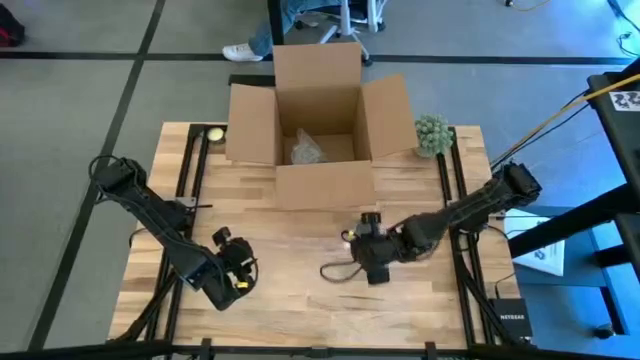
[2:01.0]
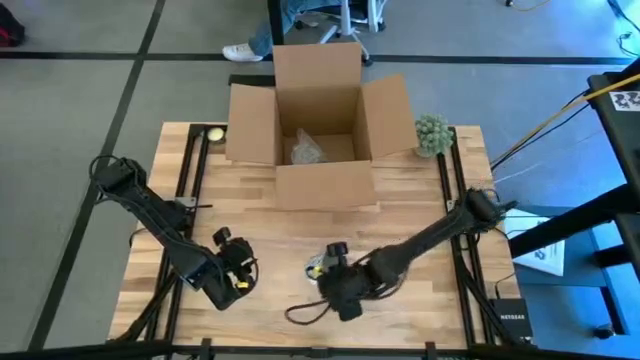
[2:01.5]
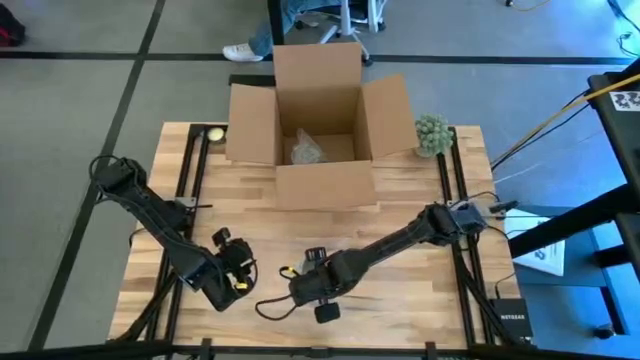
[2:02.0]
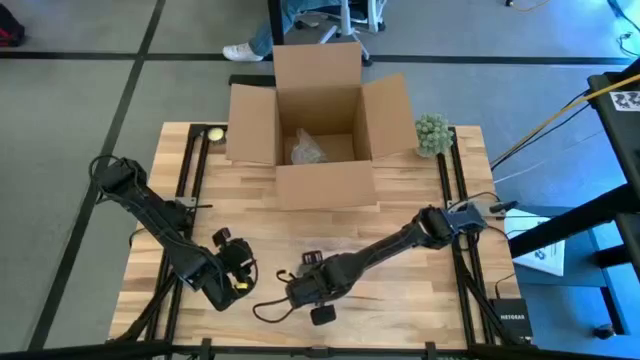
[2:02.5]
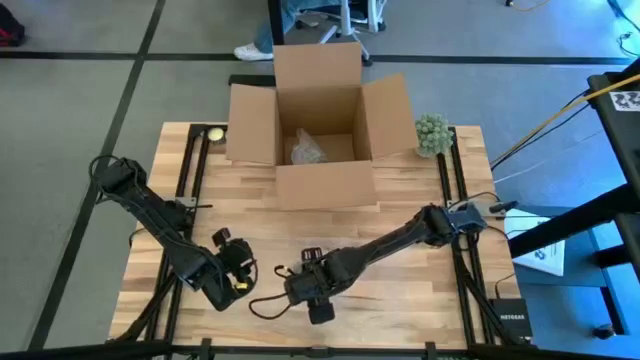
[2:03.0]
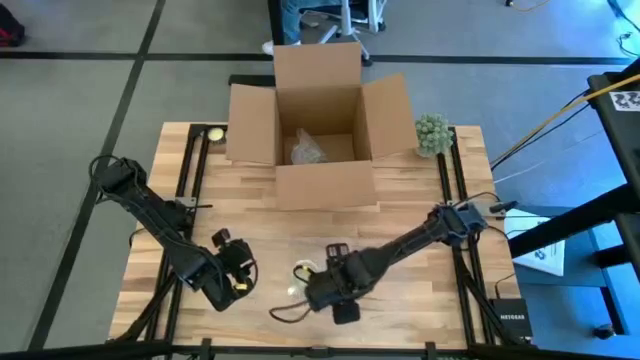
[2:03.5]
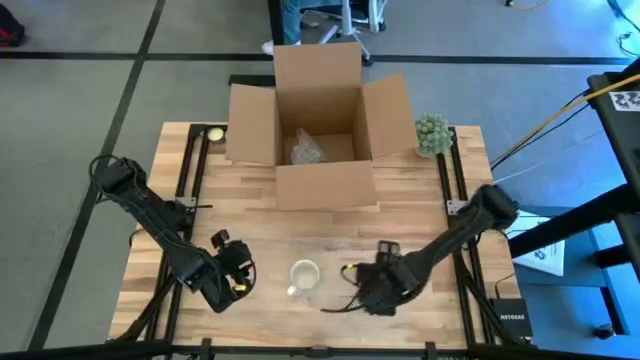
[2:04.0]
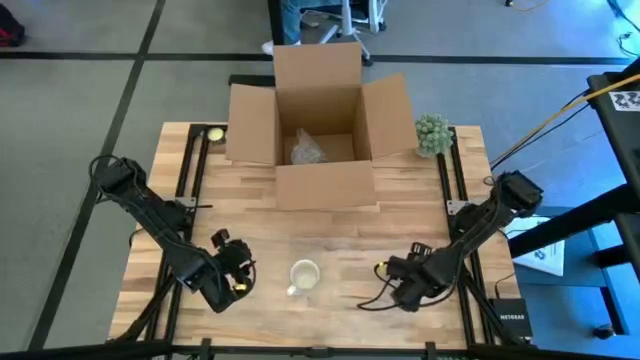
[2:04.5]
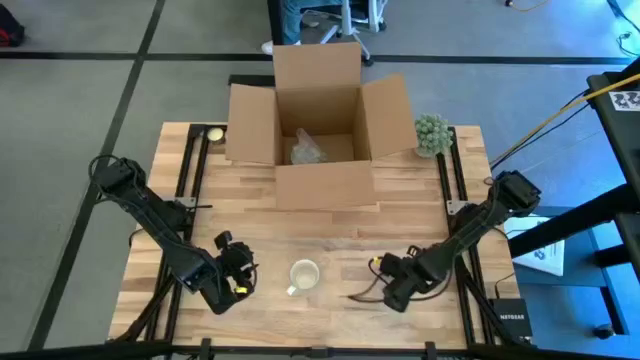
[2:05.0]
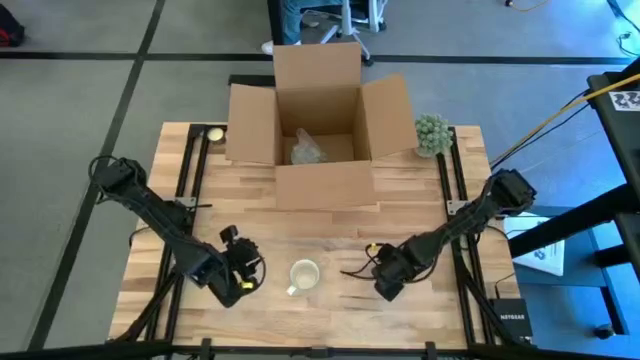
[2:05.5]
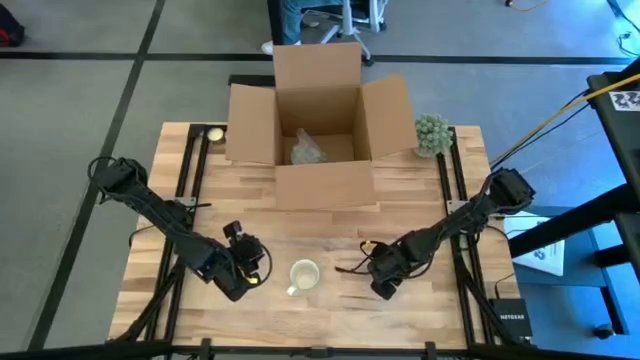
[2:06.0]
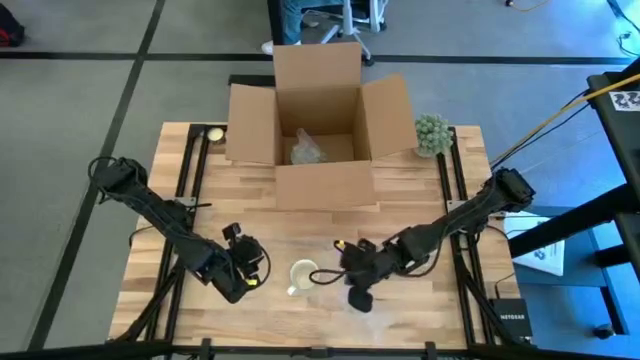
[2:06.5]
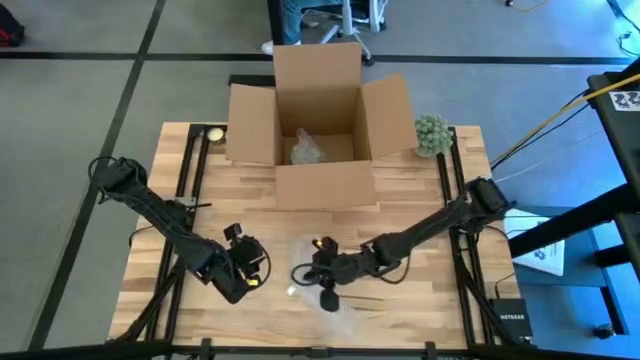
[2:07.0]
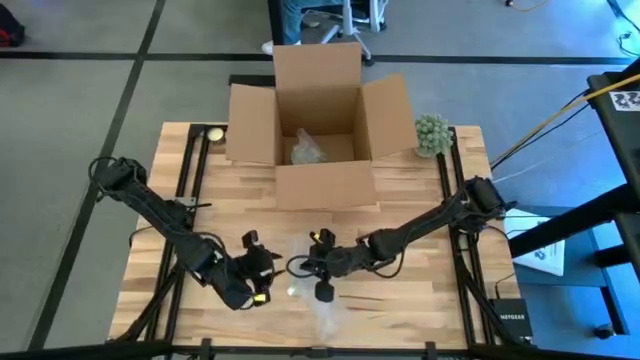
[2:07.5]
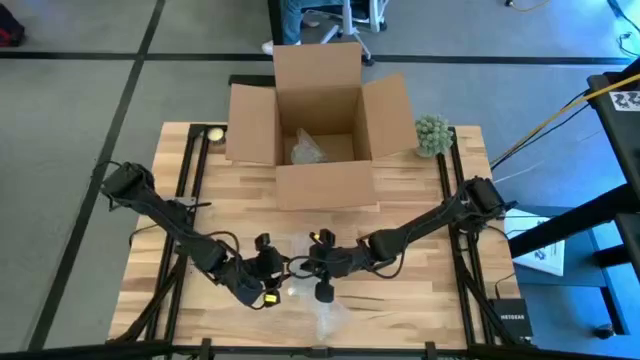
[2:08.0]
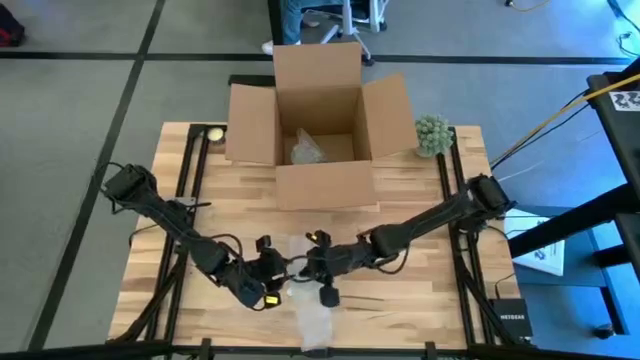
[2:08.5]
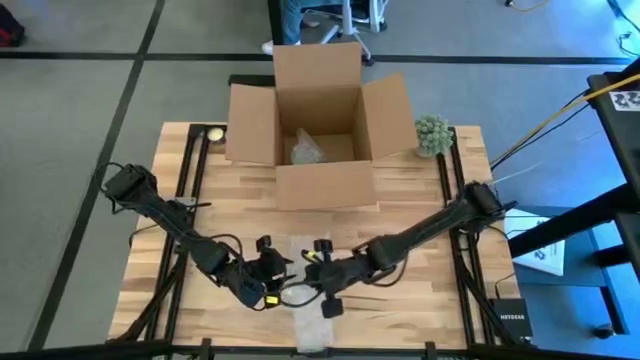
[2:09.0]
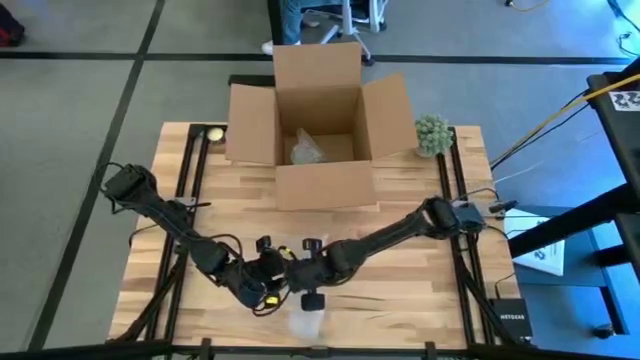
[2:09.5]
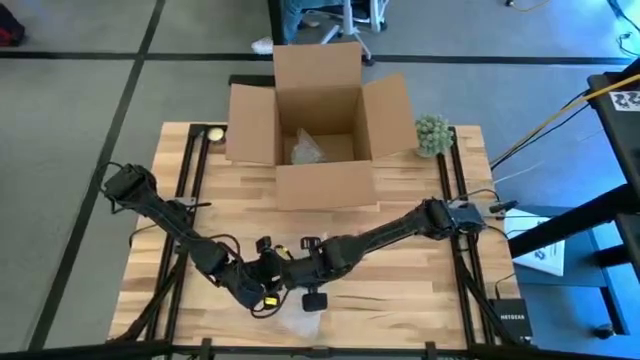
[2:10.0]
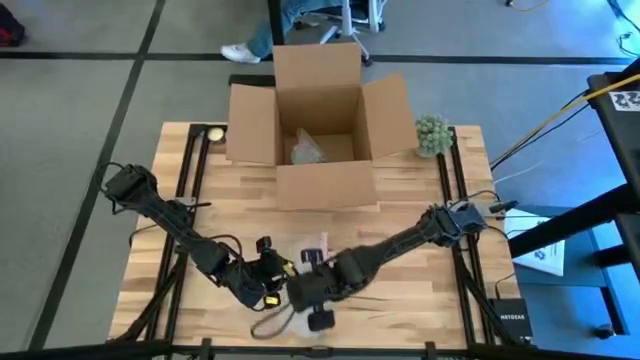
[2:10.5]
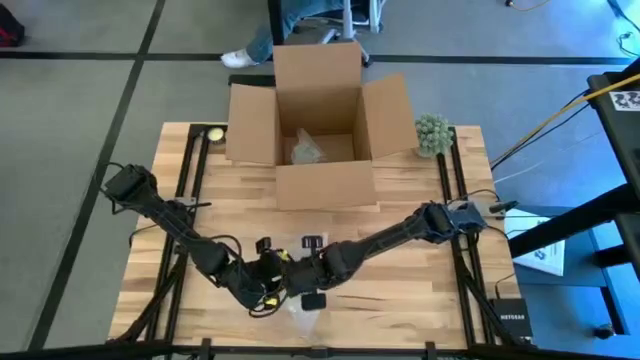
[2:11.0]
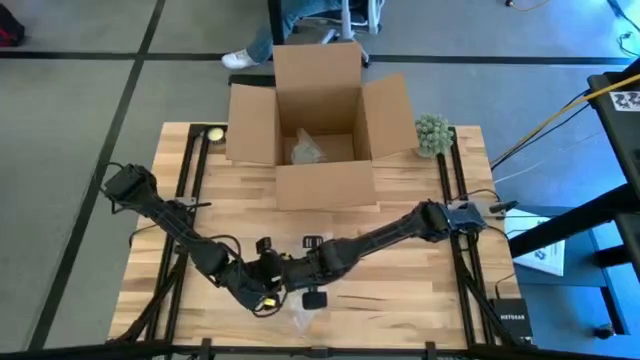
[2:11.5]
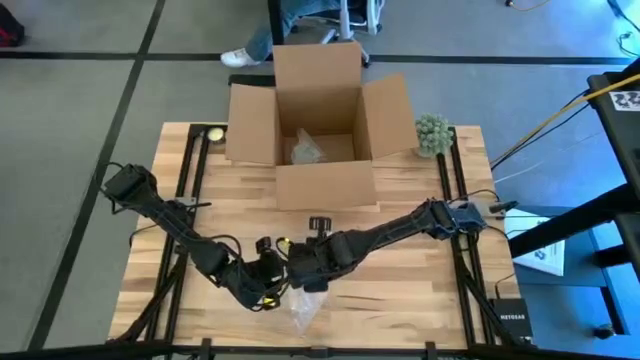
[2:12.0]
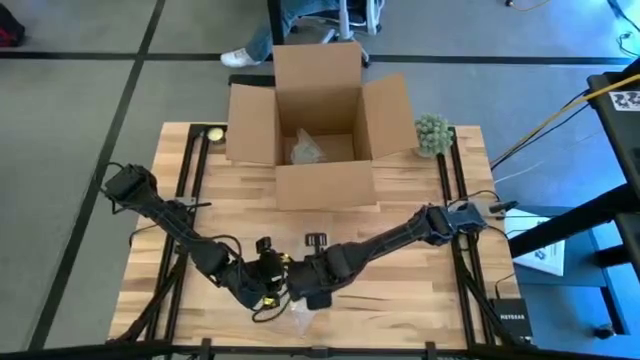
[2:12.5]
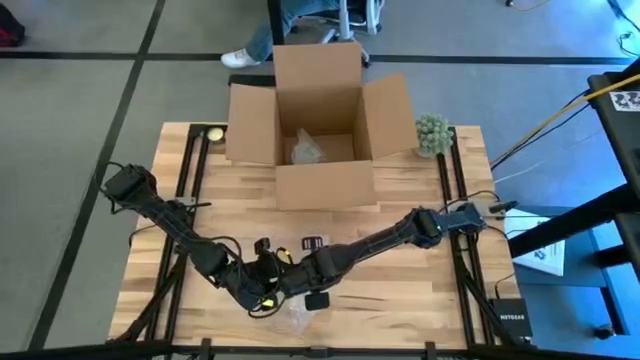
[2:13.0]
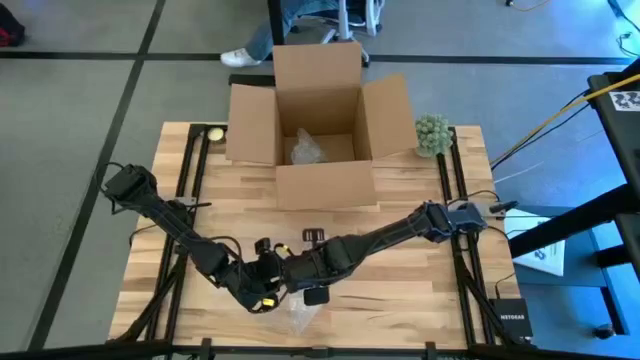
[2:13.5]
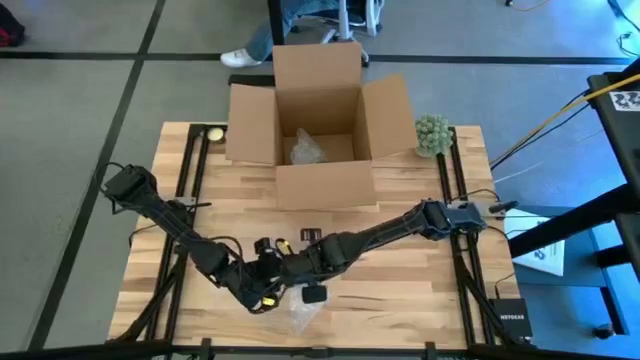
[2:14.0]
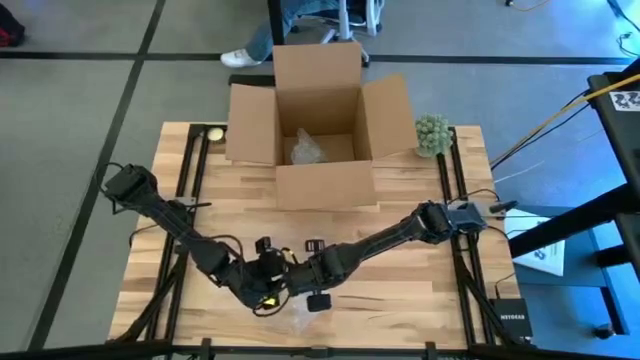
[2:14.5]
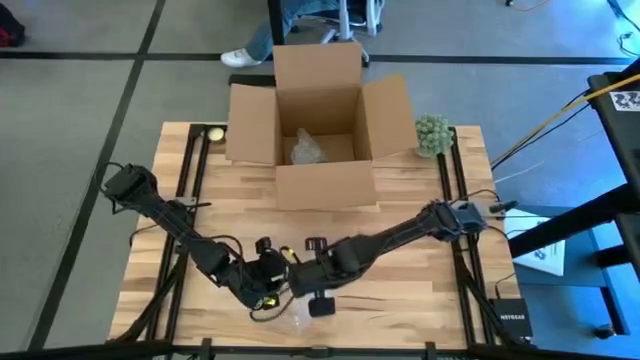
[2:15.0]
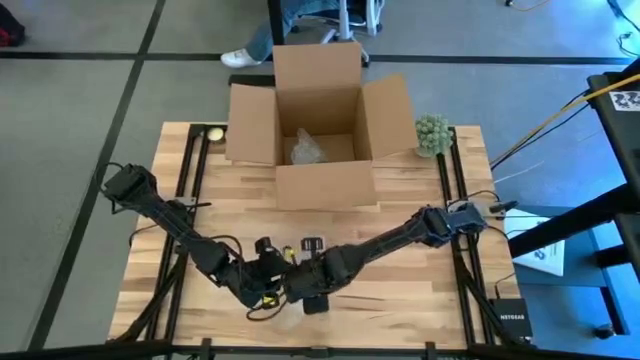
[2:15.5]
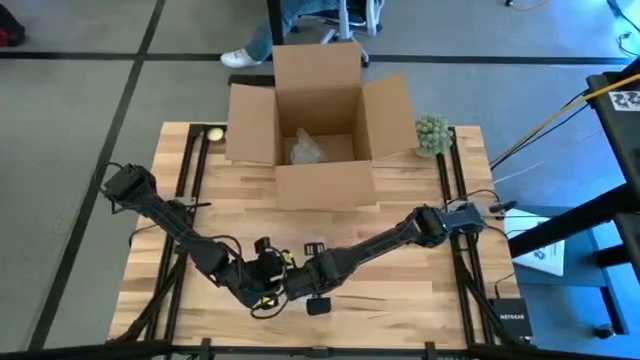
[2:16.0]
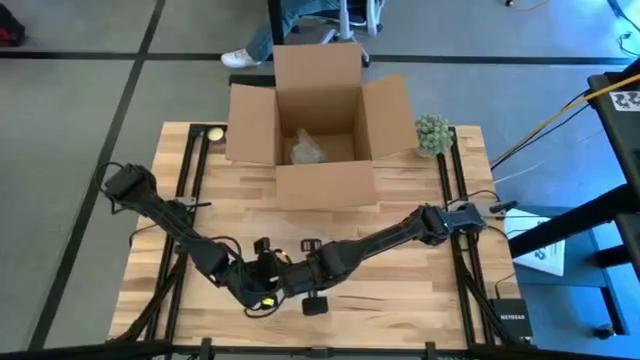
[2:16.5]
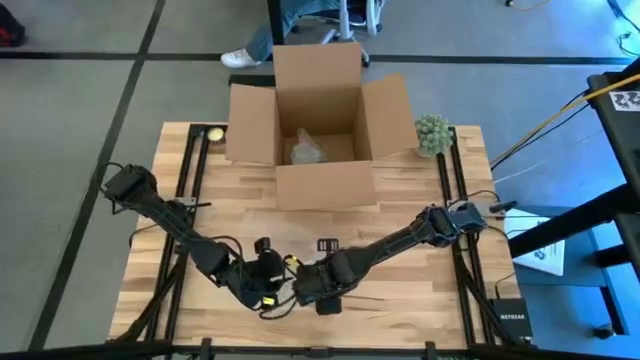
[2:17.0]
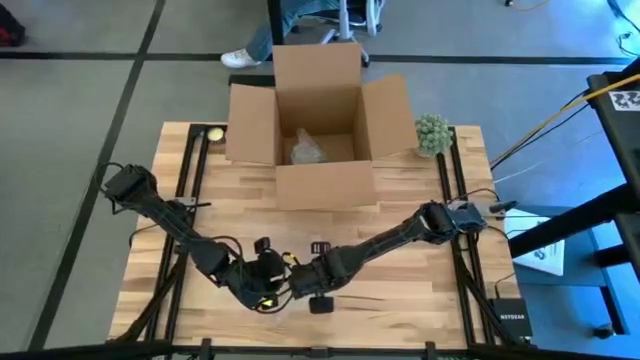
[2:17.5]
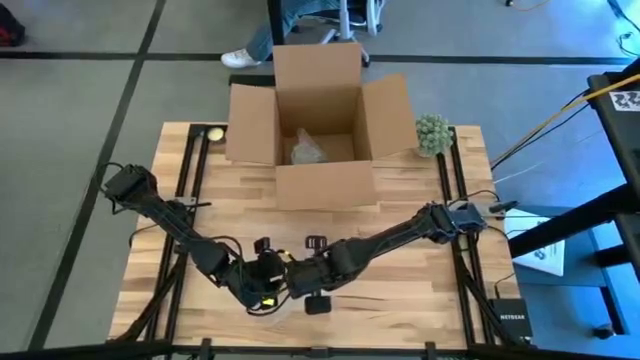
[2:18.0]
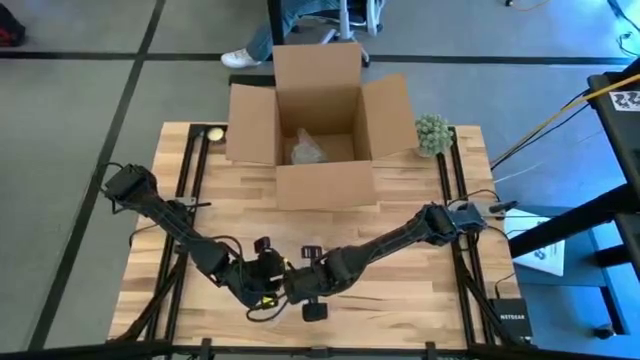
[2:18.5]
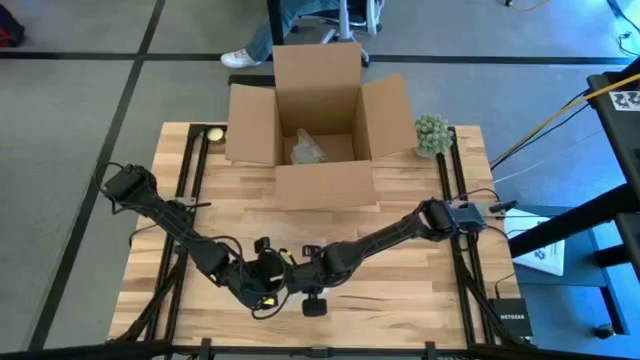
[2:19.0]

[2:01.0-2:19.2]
Task: wrap mug
Wrap the white mug with bubble wrap

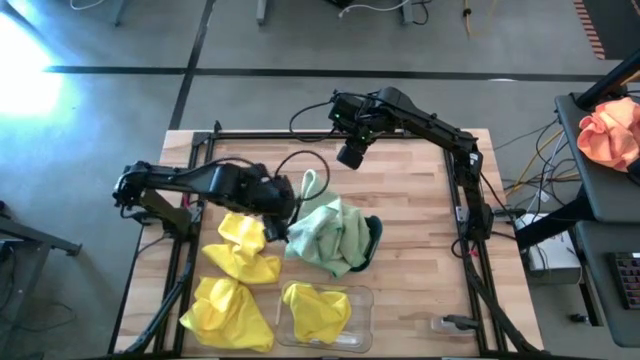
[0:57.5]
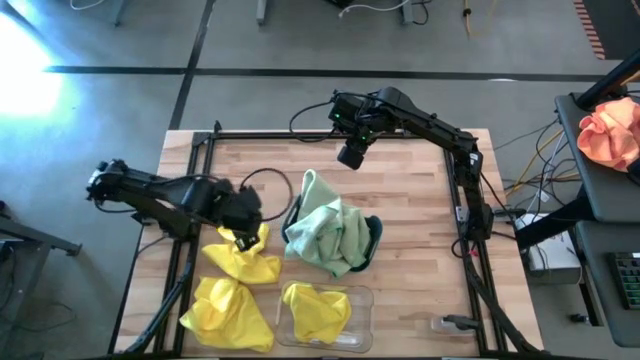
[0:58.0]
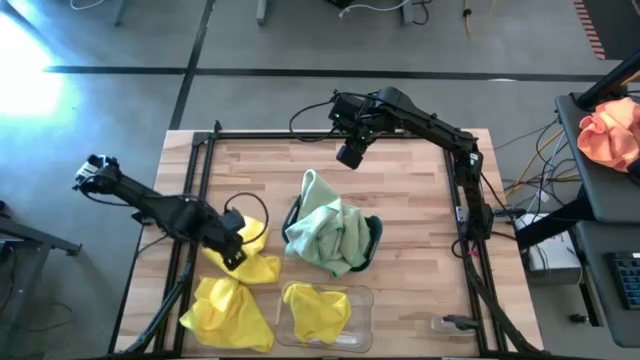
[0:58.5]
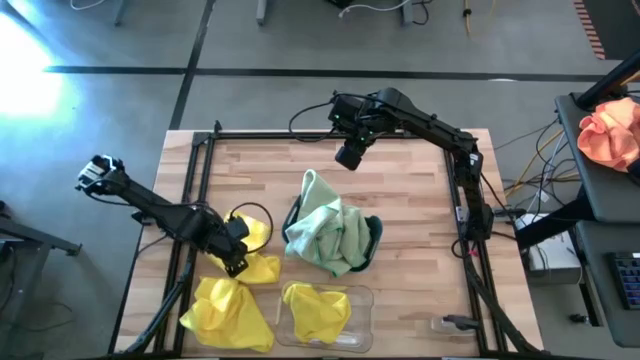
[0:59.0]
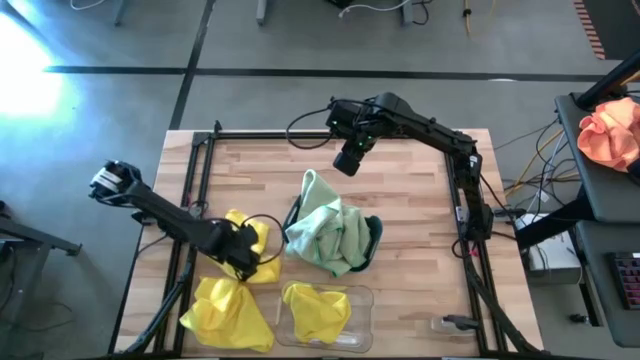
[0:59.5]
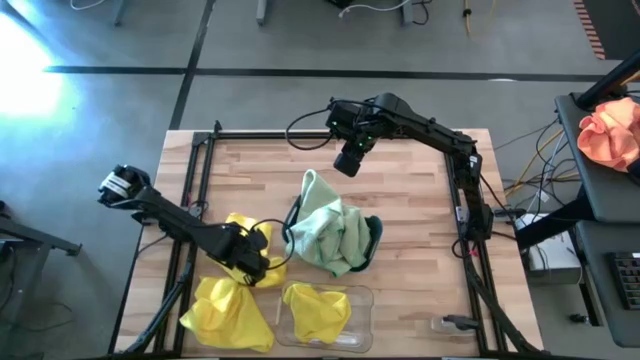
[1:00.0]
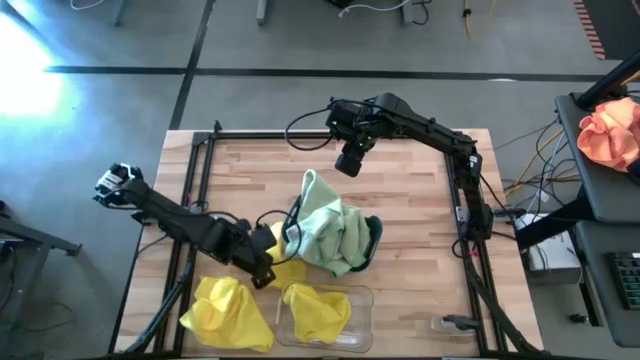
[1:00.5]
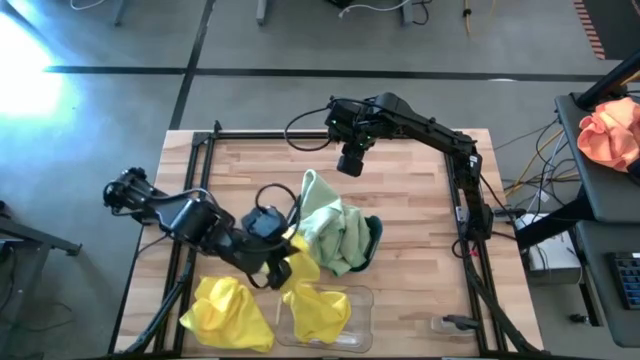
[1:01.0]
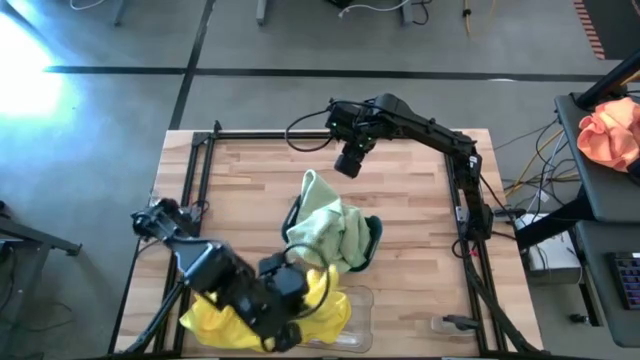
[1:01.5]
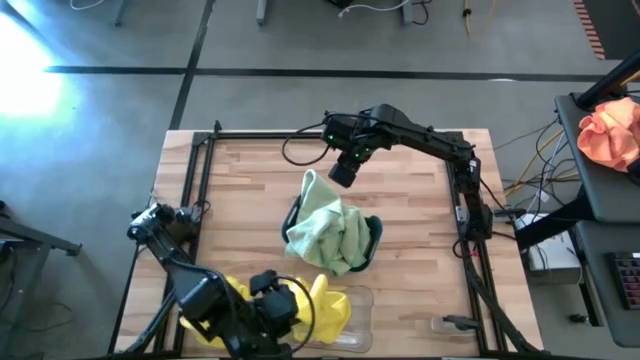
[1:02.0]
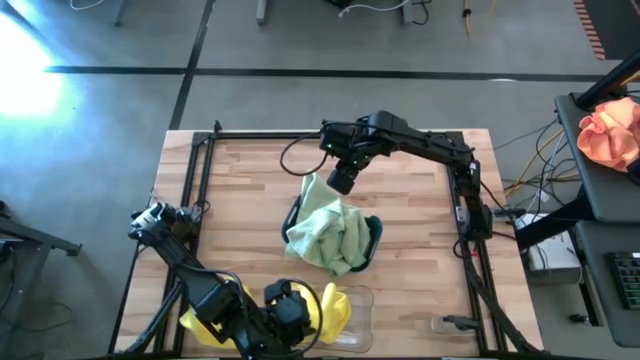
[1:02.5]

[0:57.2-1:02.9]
Task: Sort microfiber towel by color & place in baskets
Put the top yellow microfiber cloth into the transparent bin
